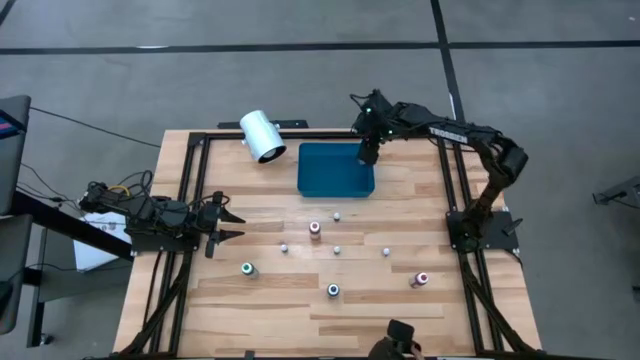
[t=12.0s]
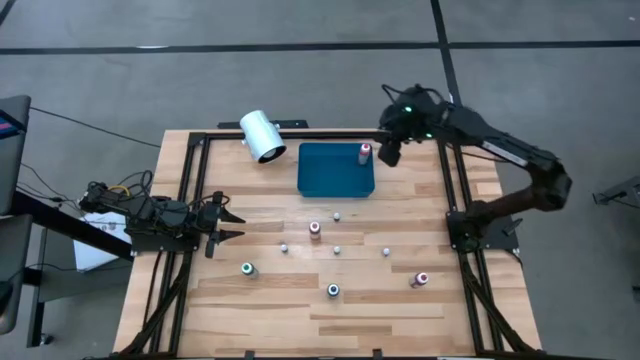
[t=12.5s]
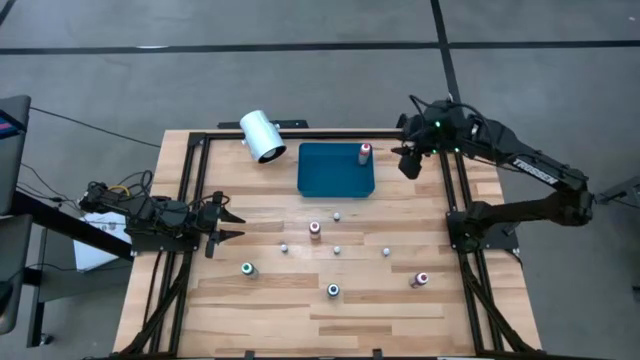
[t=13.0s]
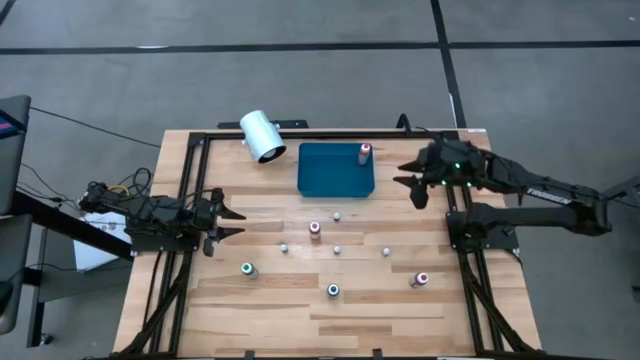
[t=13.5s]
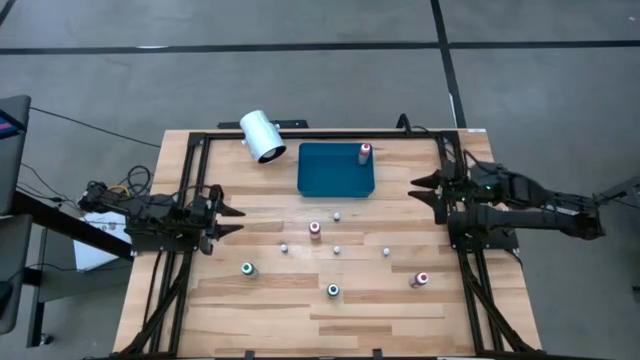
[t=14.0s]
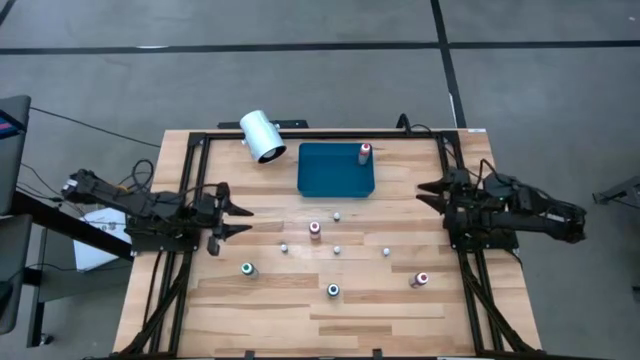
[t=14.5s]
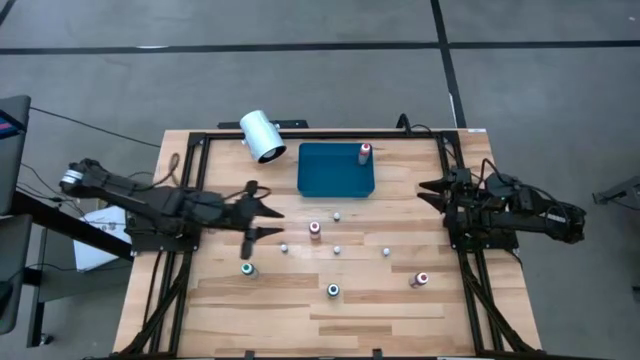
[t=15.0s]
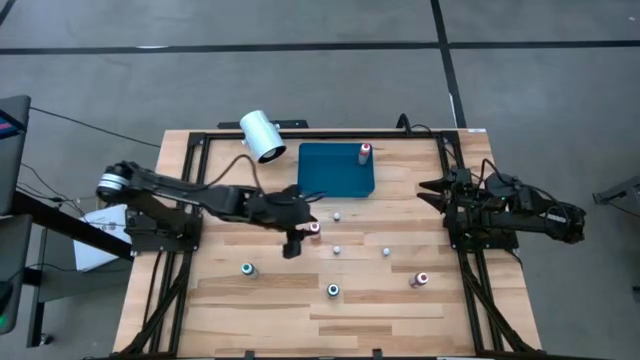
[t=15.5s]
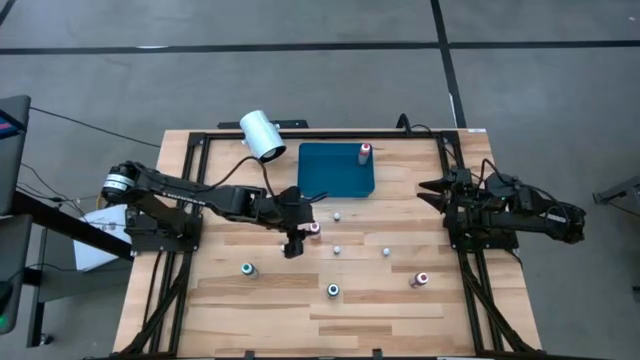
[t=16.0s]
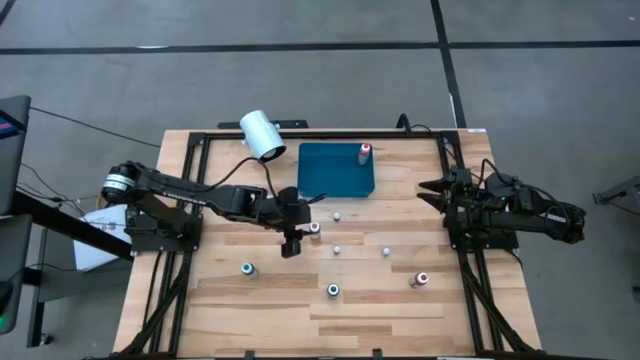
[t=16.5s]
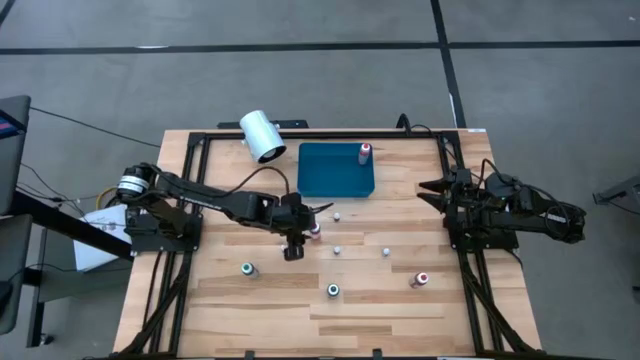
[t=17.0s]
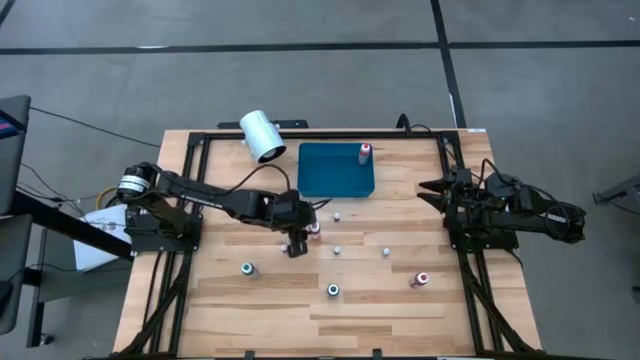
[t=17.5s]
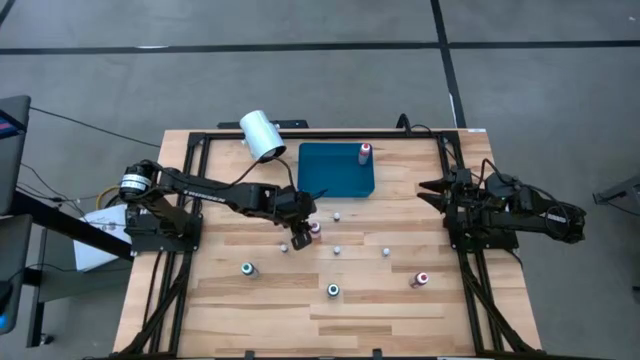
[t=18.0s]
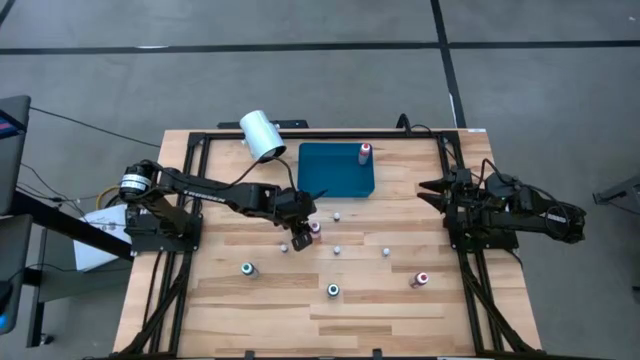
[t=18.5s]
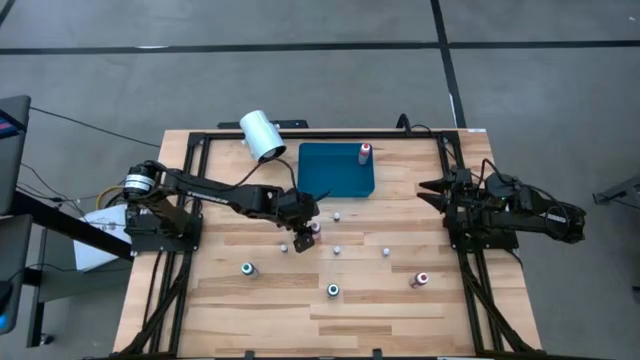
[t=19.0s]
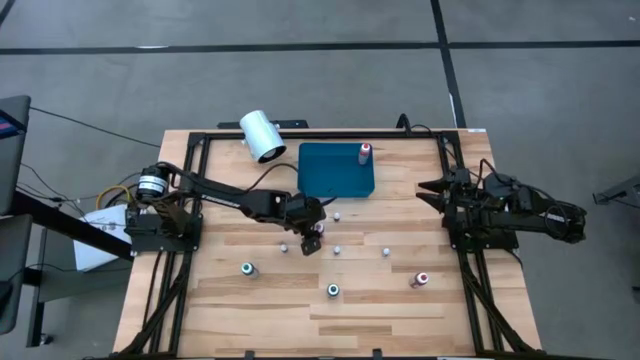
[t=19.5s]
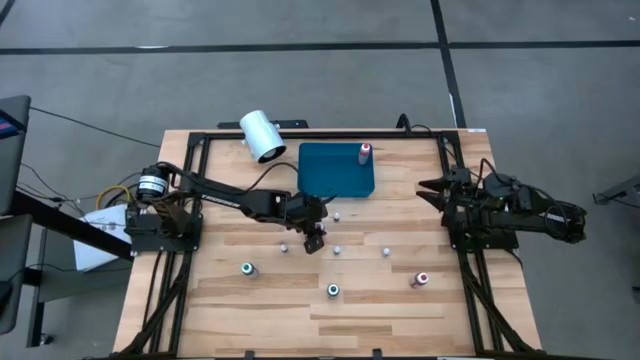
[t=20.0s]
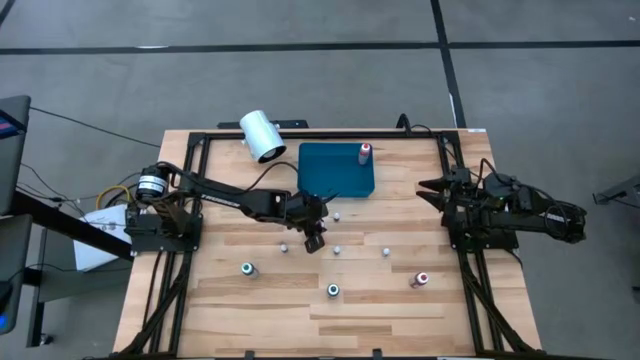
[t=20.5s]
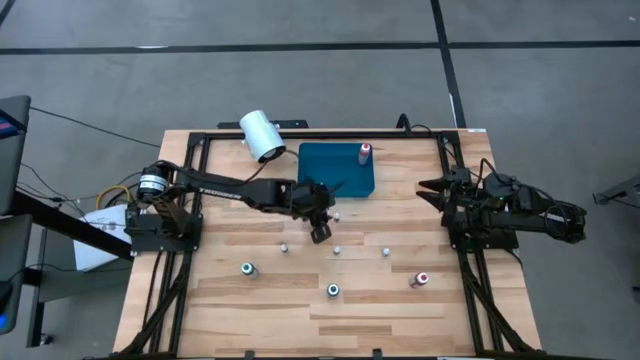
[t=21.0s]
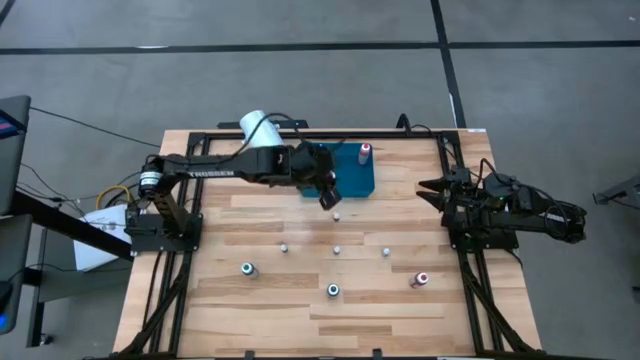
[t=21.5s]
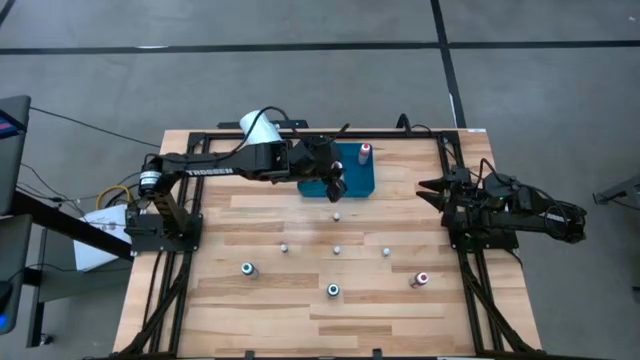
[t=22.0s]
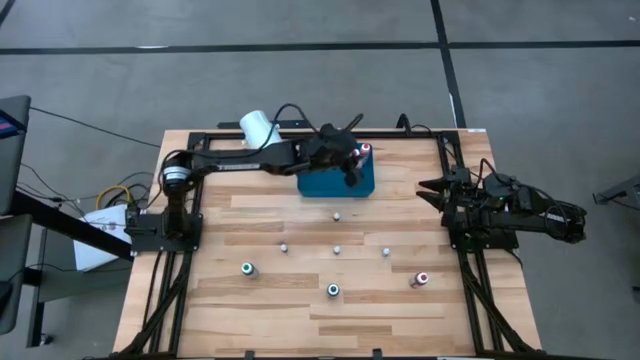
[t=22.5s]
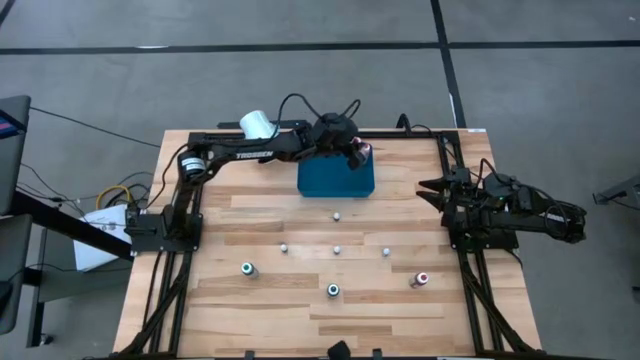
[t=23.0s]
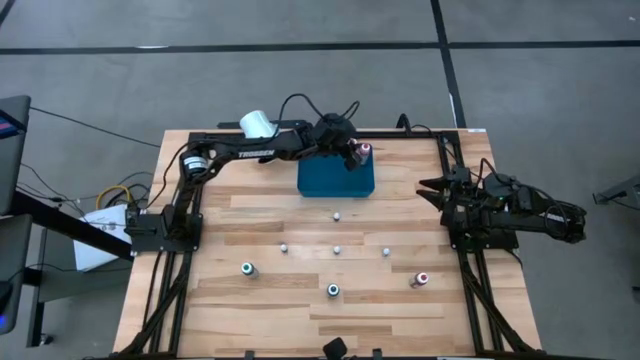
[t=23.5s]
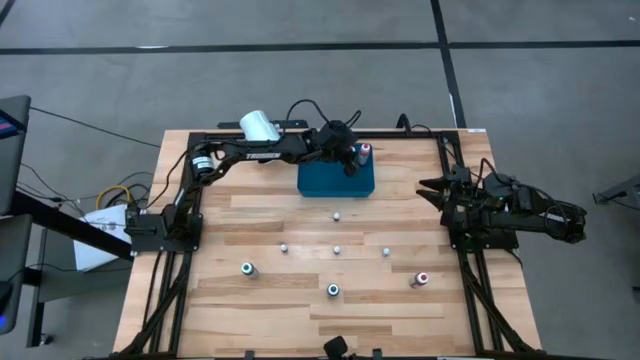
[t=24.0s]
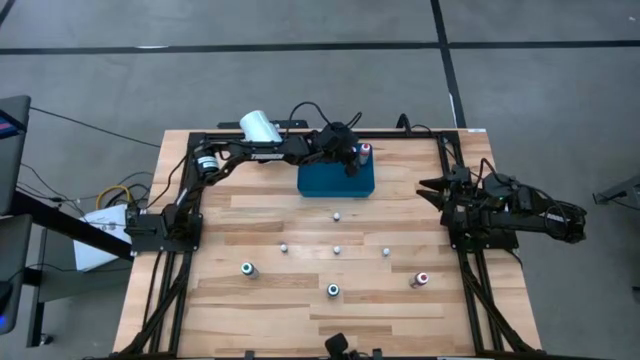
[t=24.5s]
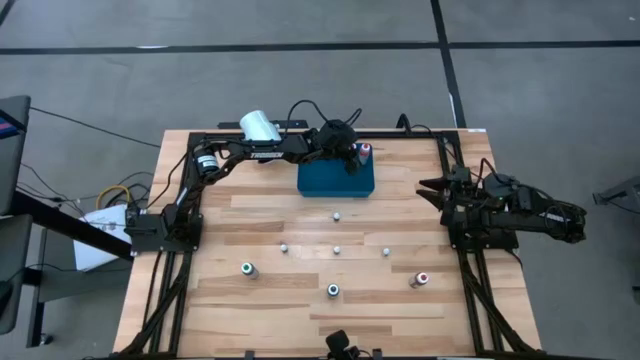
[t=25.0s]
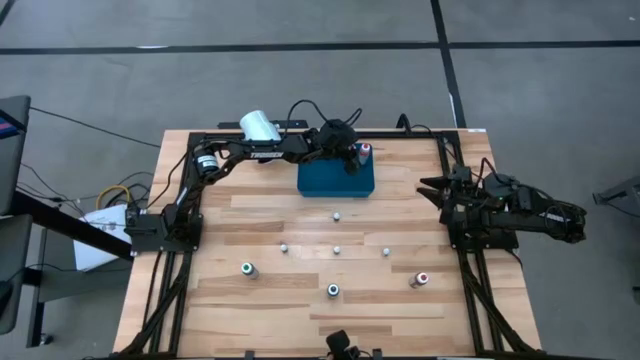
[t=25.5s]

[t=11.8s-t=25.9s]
Task: Pick & Place food coloring
Put the large pink food coloring bottle into the blue bin

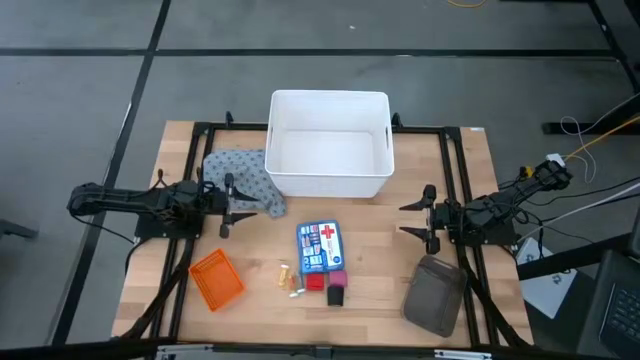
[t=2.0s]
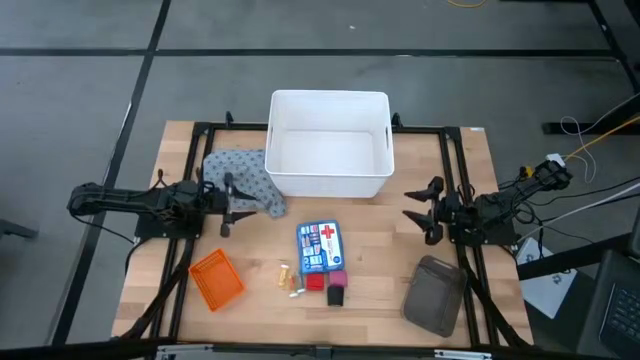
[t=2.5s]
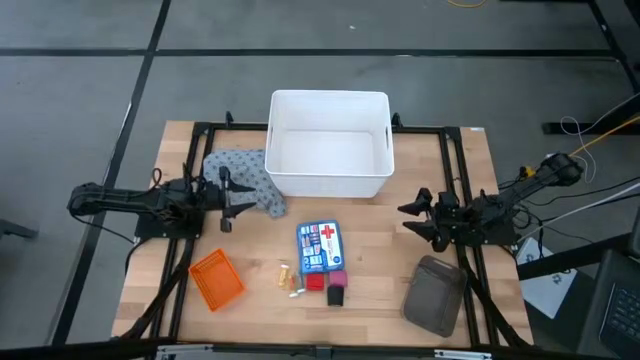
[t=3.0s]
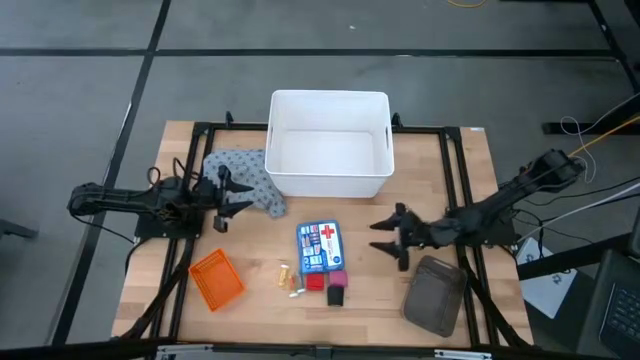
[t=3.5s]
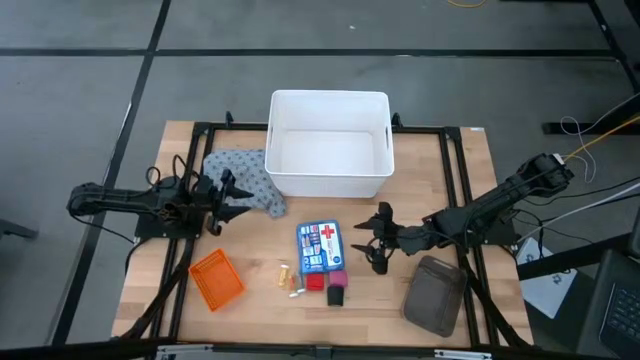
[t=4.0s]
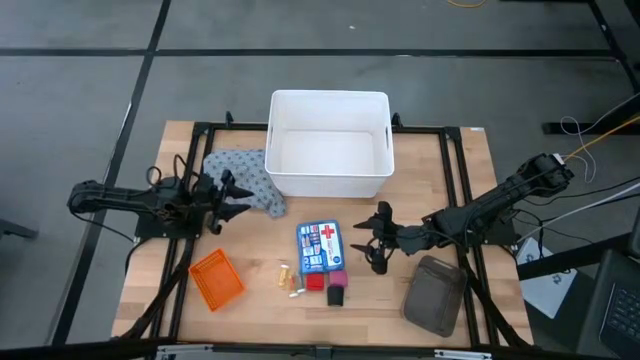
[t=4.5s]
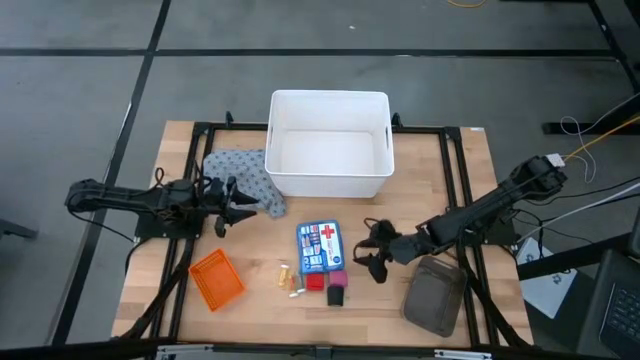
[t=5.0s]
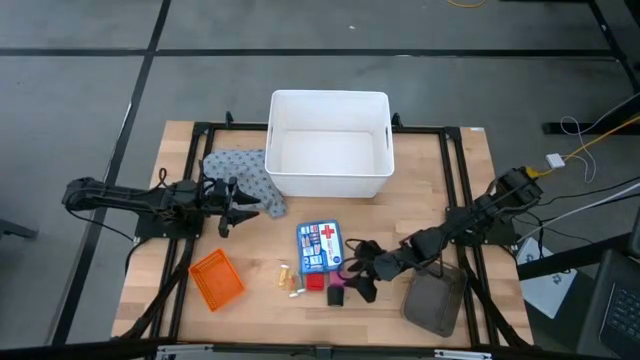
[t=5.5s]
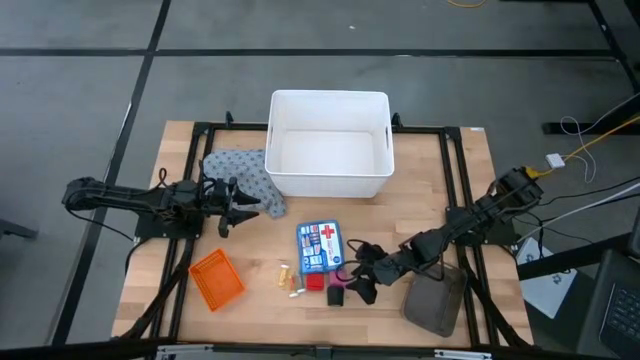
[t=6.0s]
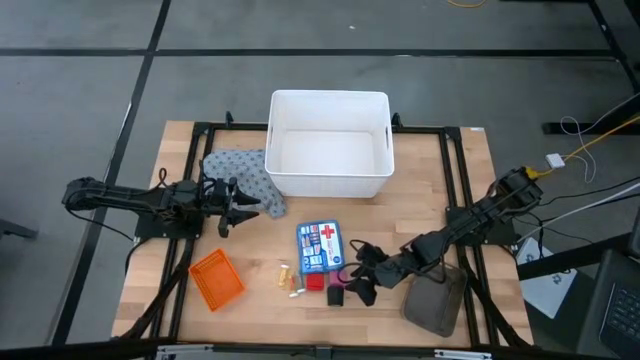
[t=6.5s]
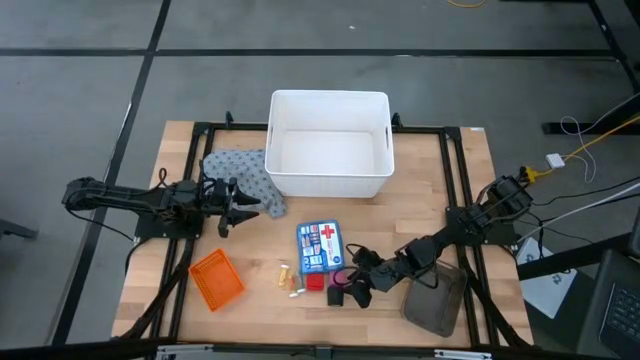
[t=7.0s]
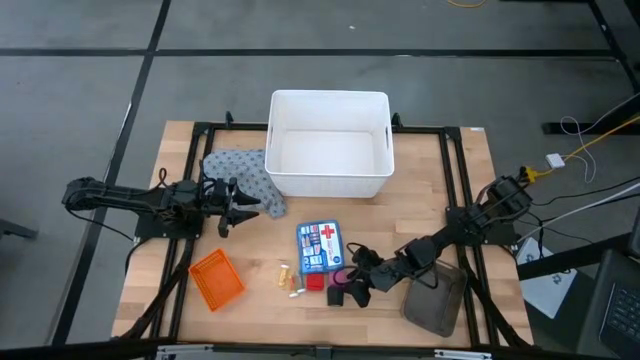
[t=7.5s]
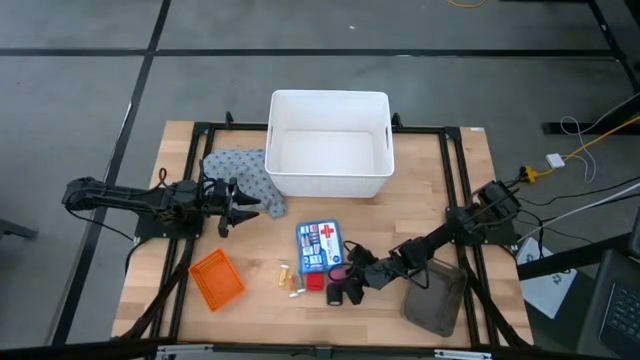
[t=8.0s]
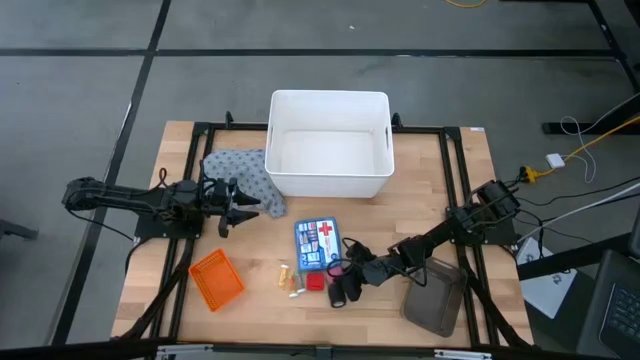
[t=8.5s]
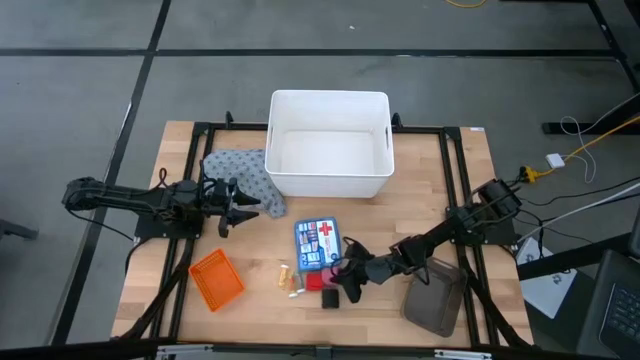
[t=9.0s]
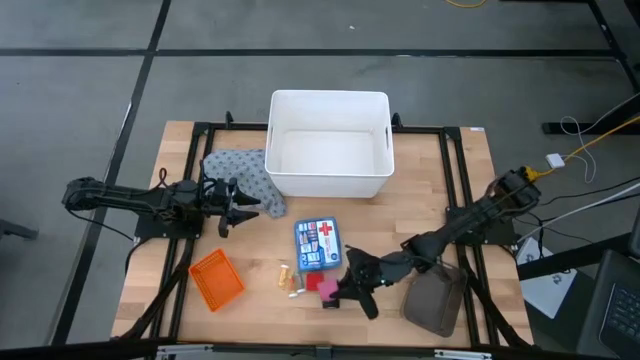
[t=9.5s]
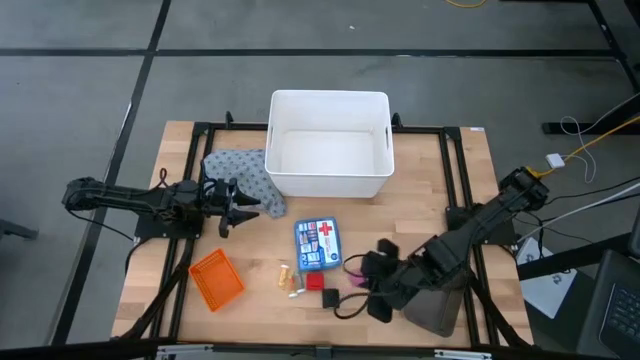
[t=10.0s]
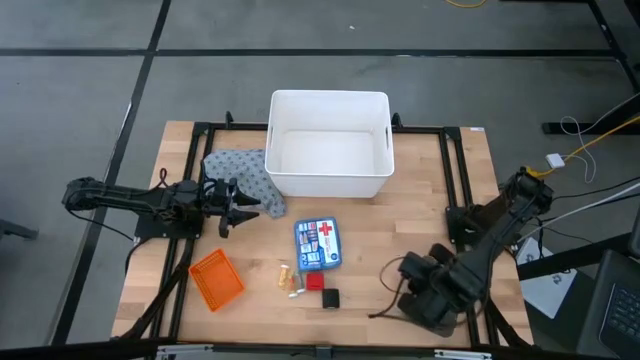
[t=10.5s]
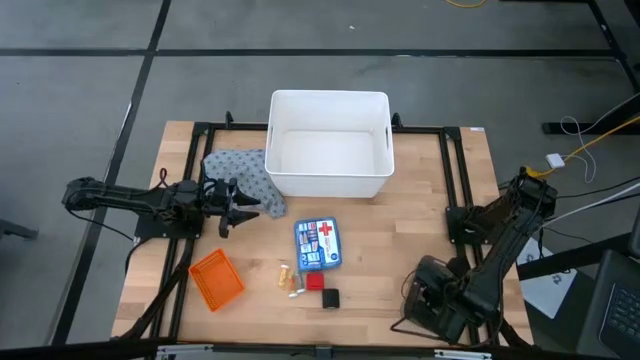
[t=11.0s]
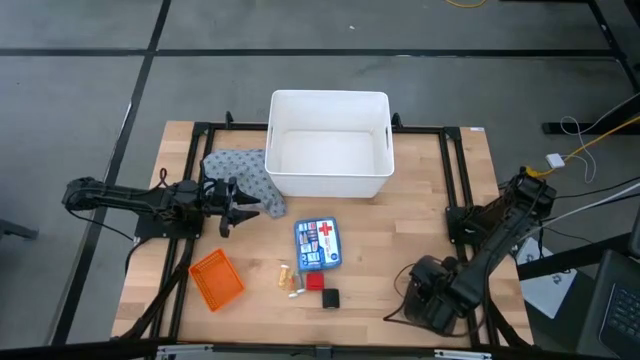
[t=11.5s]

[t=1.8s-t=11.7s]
Task: Pick & place medical supplies in basket/bin
Put the pink bandage into the black bin
